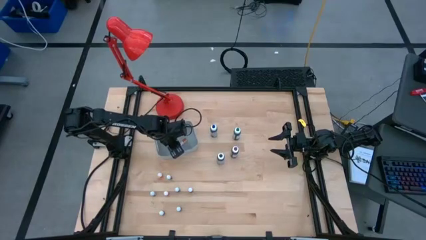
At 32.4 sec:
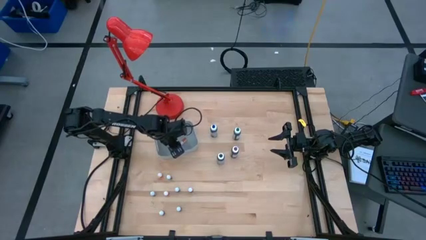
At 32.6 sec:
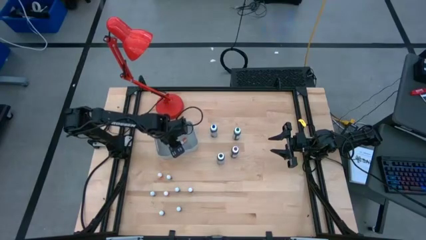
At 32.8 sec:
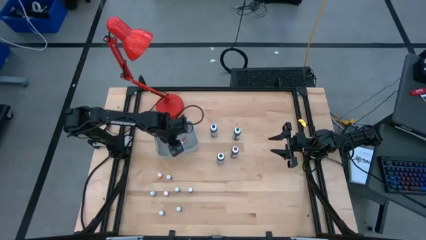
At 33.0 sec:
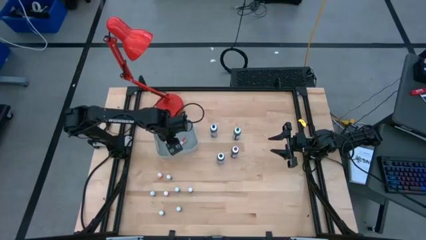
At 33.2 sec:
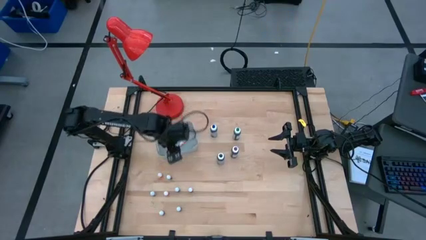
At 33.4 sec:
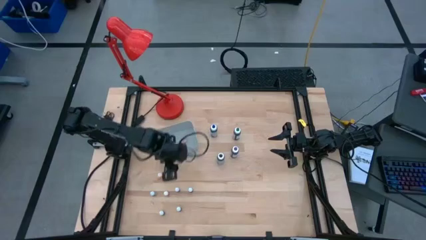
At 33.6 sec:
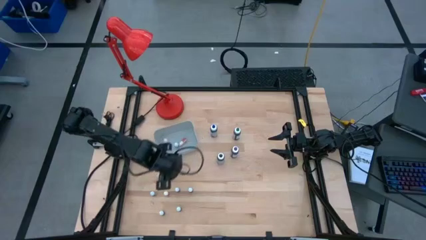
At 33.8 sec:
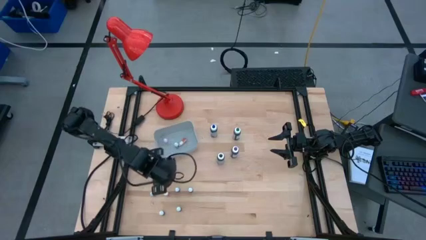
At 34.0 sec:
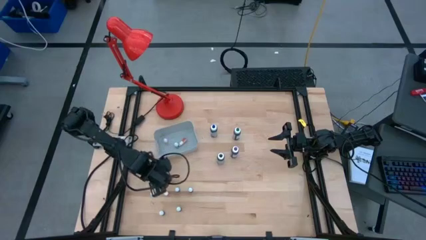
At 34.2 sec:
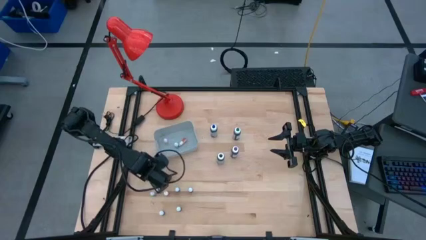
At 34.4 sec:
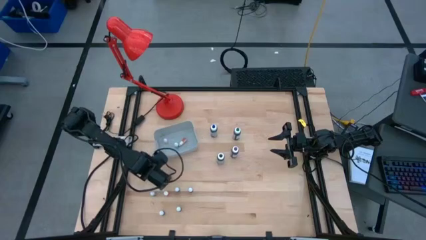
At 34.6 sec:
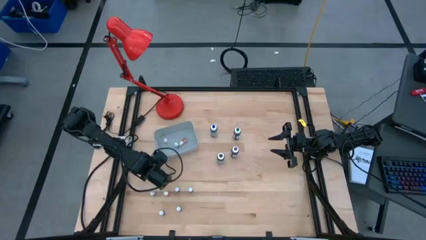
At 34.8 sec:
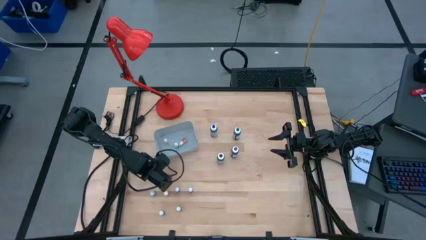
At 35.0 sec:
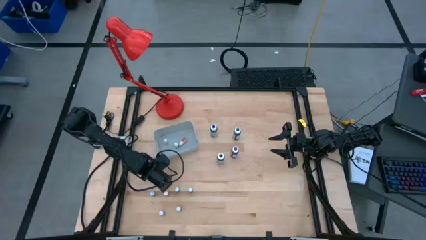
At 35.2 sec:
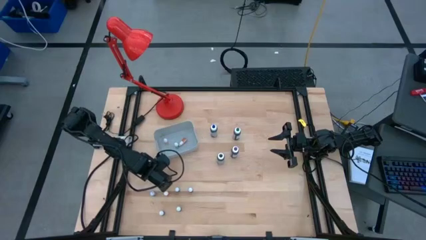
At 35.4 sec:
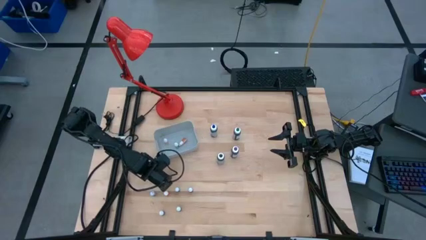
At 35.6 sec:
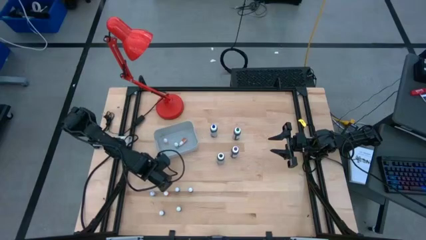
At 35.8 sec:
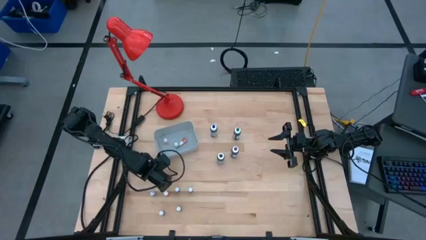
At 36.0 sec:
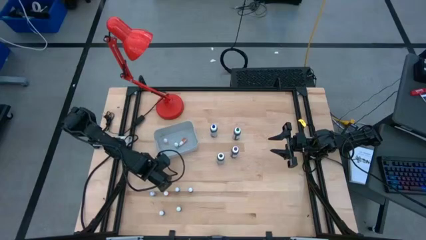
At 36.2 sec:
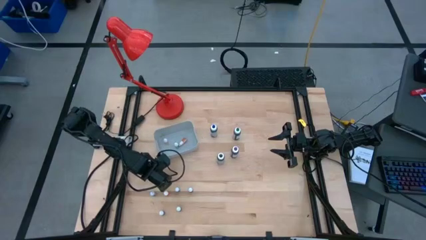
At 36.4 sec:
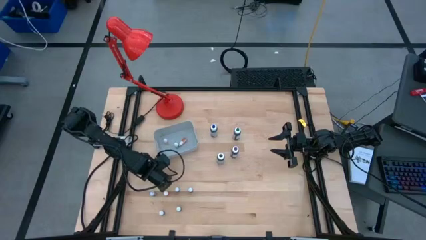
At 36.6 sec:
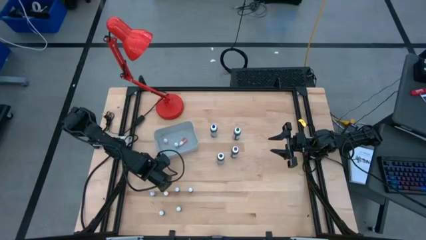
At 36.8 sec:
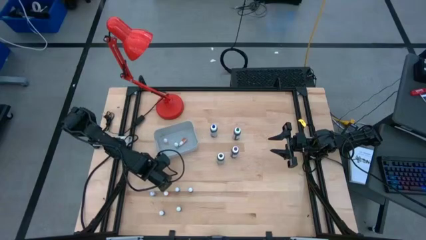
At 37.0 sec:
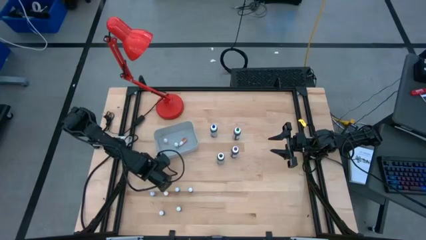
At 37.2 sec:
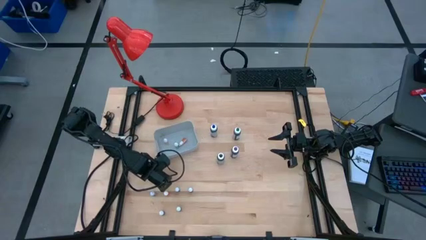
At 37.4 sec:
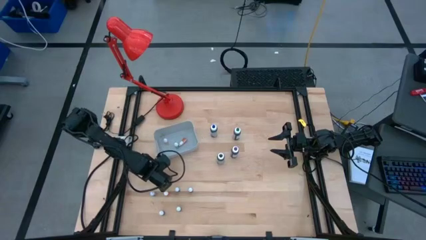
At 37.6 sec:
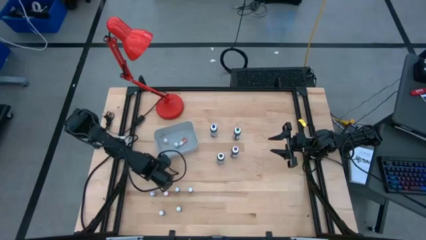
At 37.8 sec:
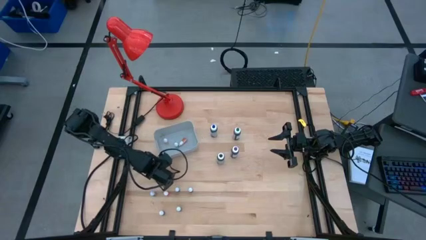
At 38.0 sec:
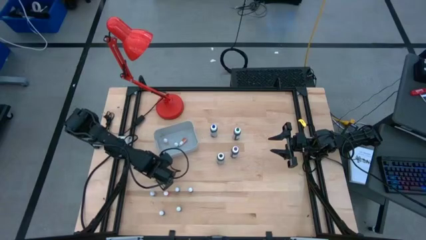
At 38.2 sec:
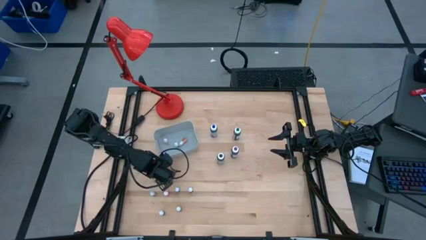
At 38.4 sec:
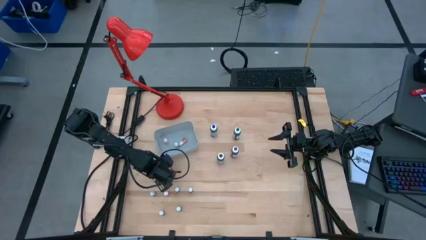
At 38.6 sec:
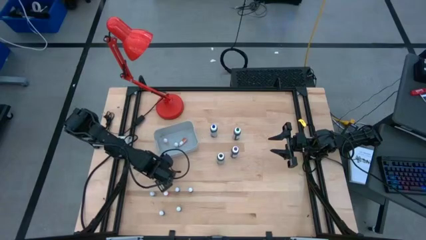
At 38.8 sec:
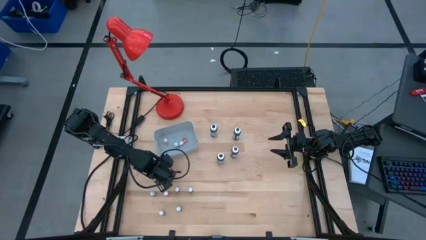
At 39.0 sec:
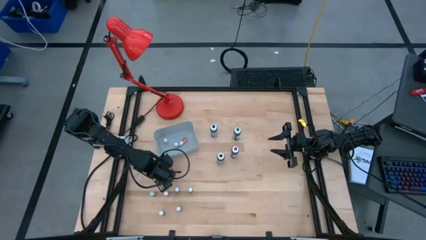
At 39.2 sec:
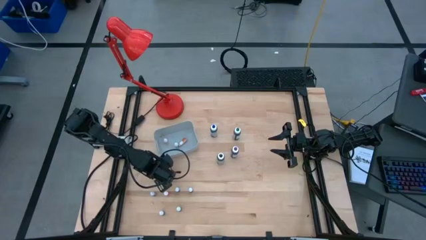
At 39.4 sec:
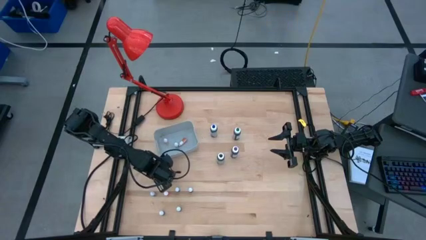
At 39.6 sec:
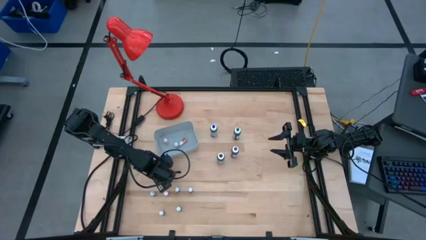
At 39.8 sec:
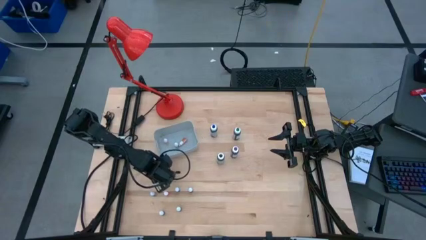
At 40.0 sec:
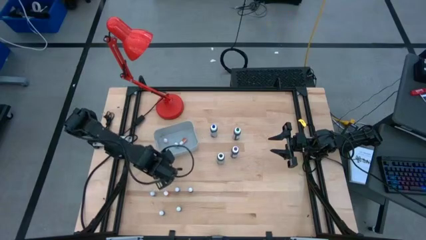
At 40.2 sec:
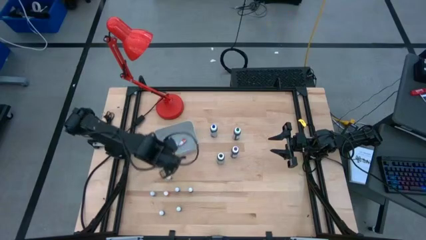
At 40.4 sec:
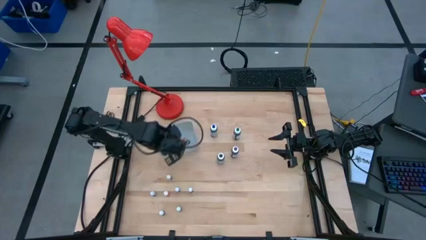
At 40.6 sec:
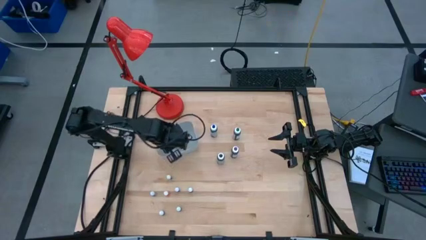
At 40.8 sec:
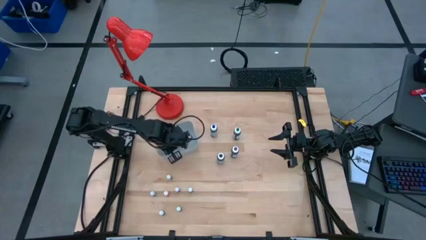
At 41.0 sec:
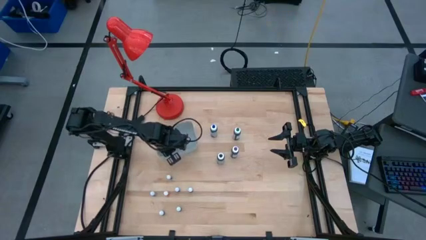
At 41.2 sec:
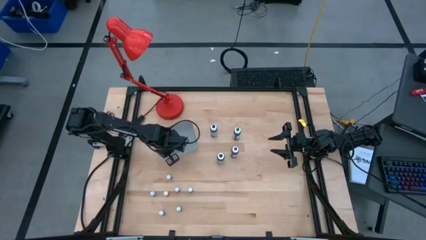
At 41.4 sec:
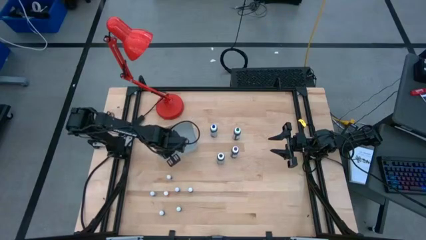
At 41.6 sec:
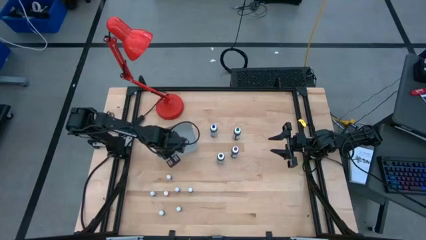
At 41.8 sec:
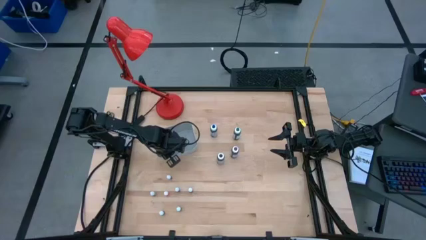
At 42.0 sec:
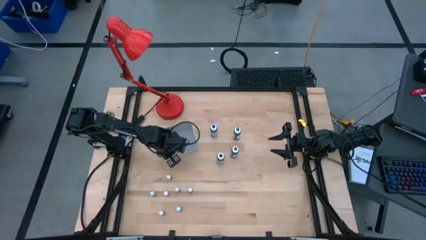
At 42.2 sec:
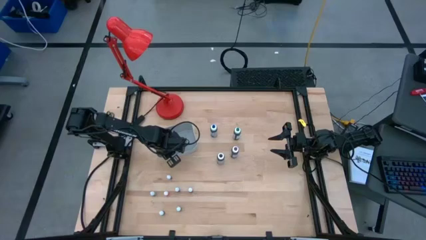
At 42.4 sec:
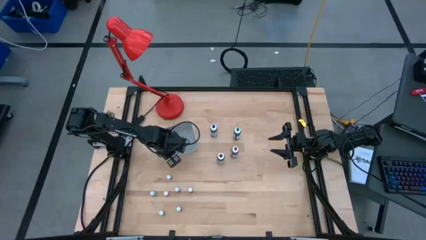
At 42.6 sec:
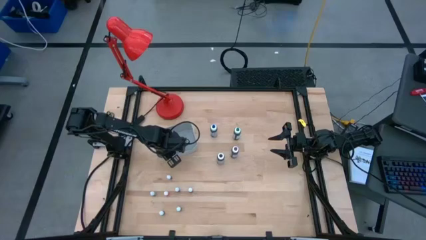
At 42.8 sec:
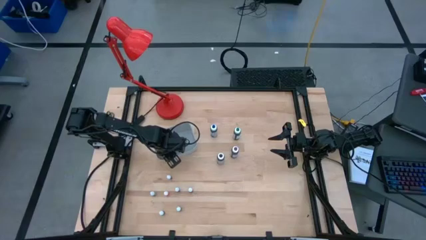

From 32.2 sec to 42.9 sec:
Task: Pick & Place food coloring
Put the top small orange coloring bottle into the gray container
